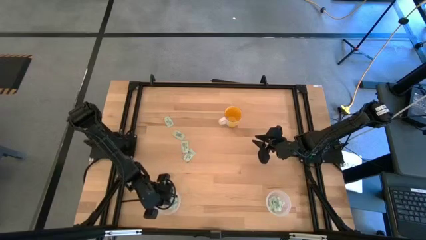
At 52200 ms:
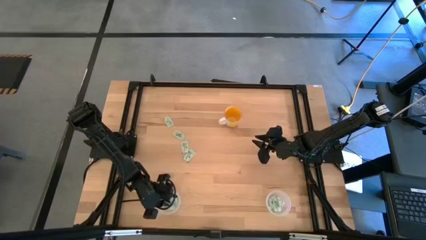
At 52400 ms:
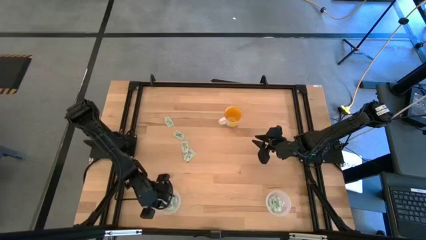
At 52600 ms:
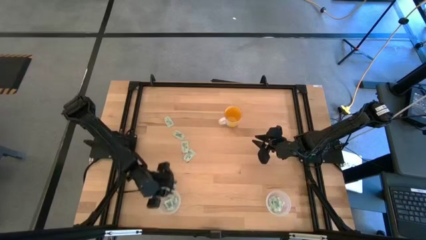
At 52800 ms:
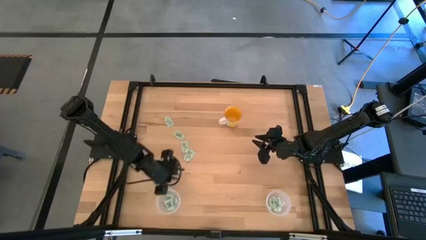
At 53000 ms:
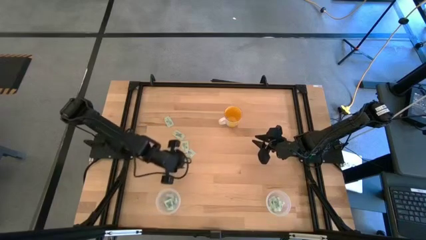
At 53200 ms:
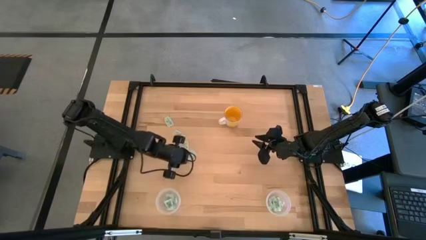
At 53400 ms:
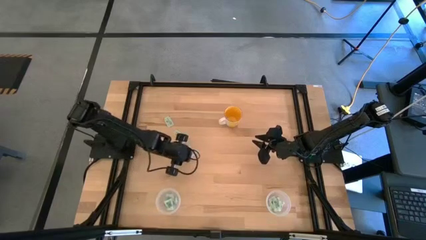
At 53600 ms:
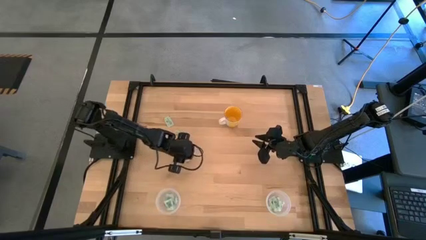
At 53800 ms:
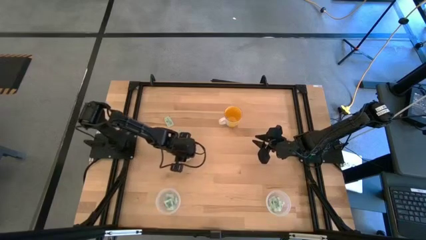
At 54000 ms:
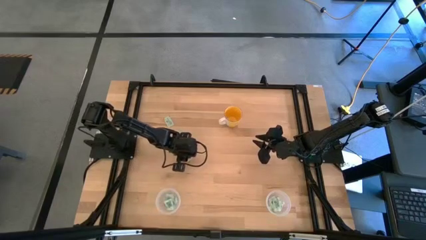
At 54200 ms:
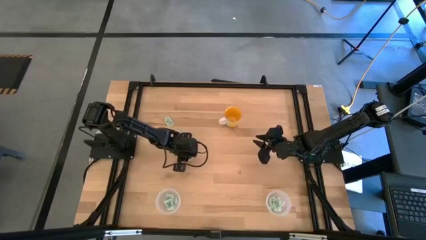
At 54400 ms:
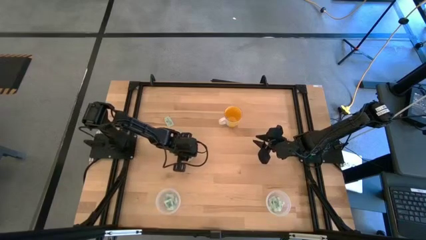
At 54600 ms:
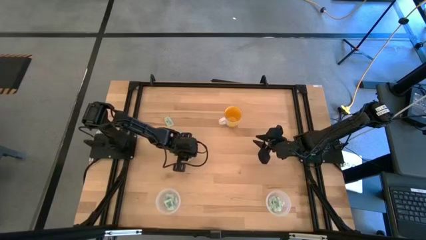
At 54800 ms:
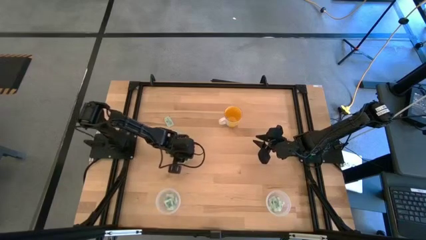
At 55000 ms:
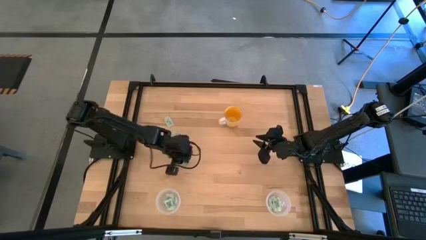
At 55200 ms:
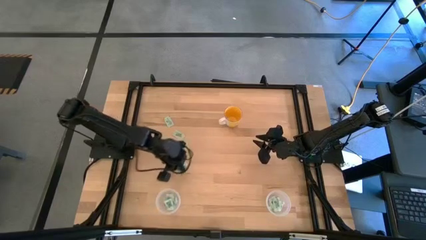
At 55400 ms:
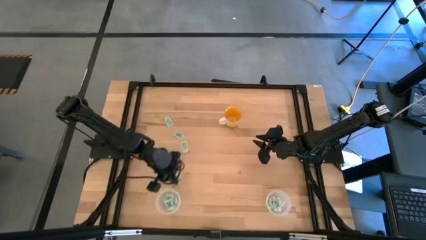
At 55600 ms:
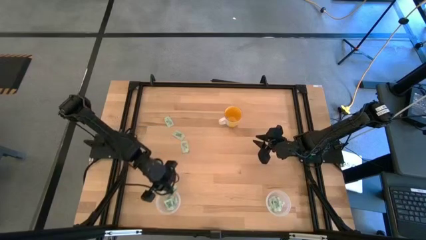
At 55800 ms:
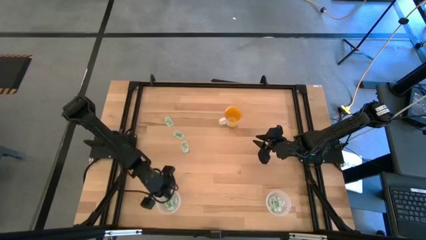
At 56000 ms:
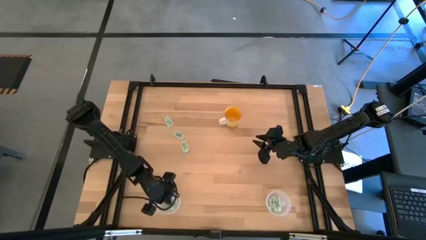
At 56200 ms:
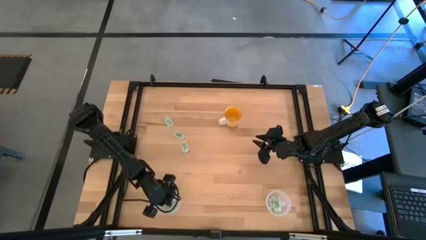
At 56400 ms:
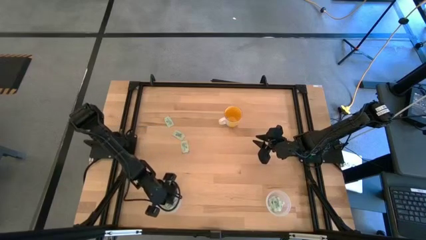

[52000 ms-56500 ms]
Task: Pick and place items into bin
Put the stevia packet into the left transparent bin

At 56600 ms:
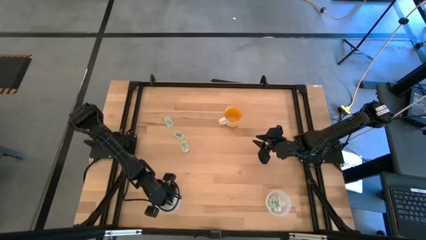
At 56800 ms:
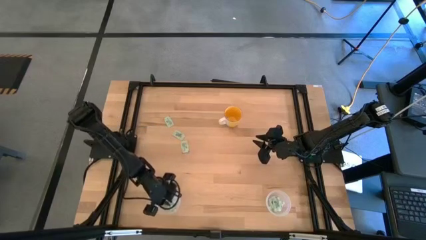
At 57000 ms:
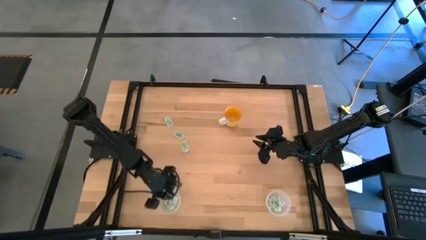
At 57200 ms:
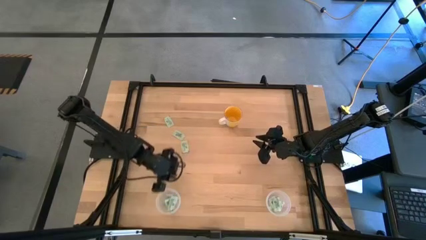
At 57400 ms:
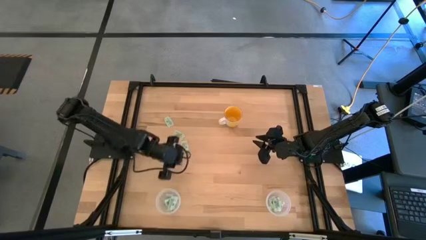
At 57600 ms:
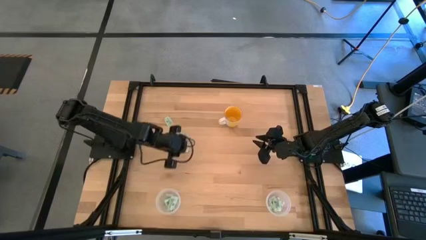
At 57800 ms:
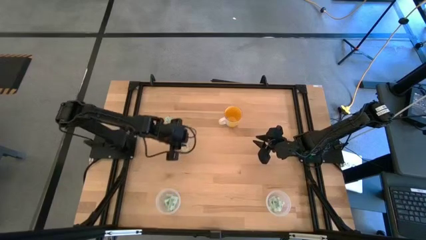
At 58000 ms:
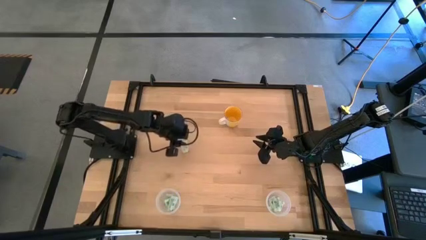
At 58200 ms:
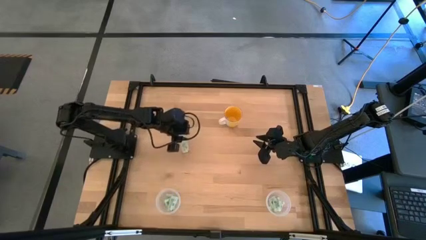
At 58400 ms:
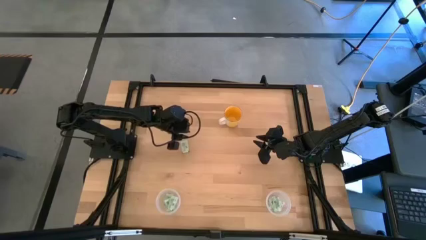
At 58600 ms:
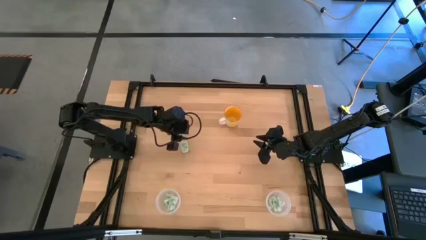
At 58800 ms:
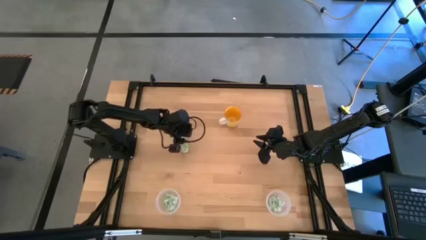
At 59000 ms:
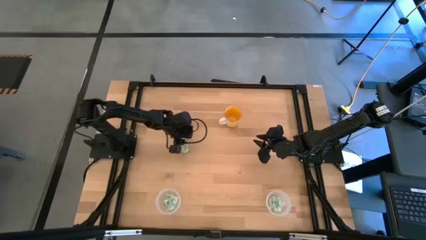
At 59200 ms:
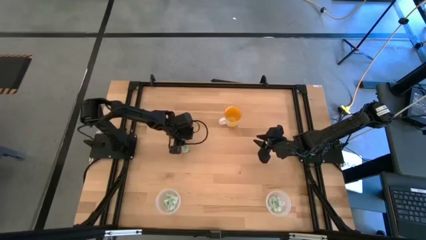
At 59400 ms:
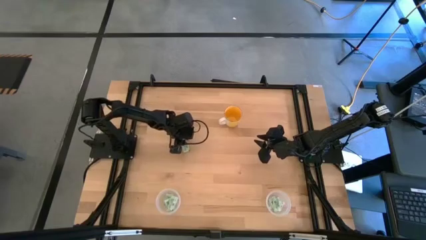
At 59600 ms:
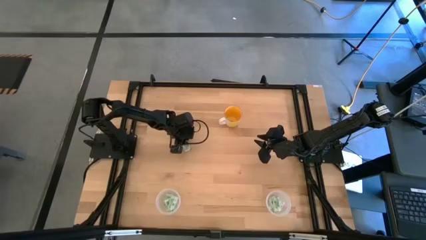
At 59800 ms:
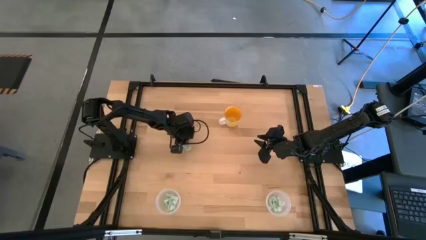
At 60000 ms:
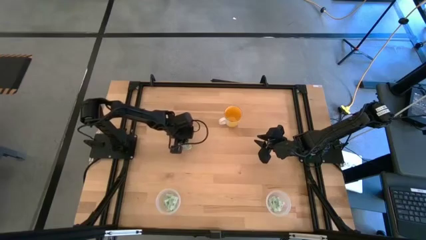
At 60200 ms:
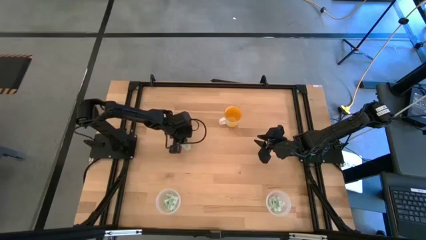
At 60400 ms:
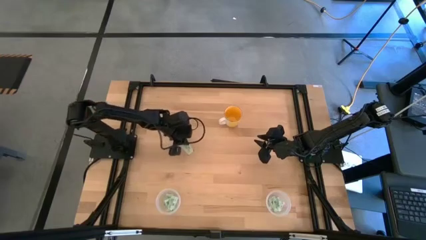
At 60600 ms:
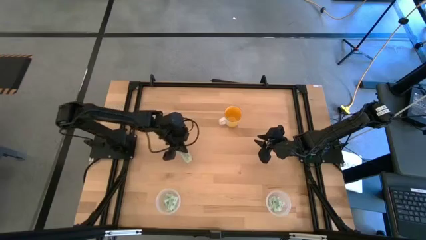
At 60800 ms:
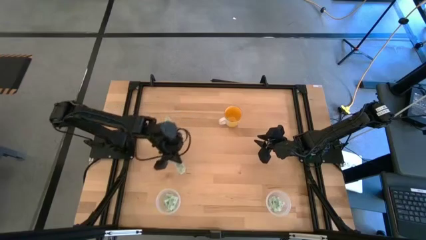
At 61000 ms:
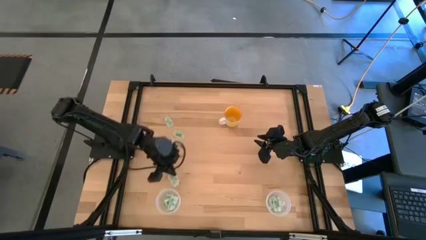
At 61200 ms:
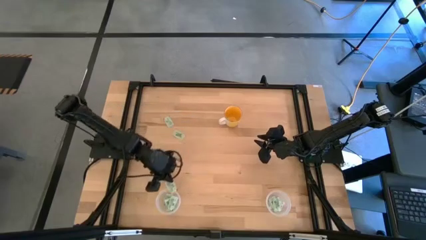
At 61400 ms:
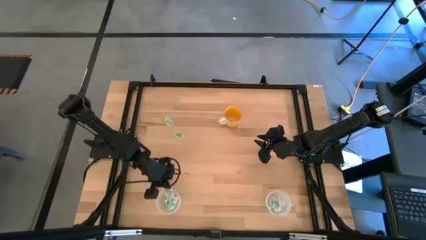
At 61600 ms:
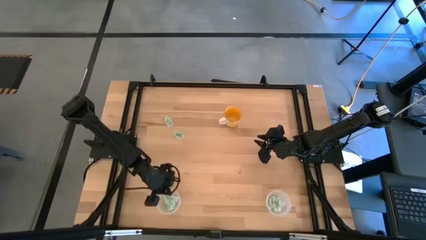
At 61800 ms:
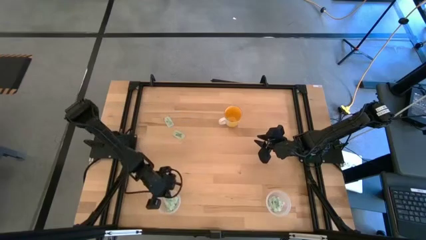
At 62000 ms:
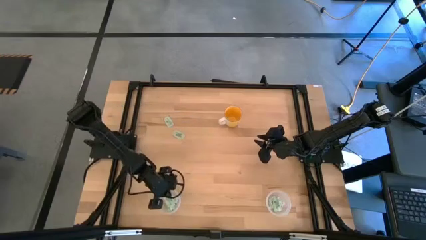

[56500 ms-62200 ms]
Put the stevia packet into the left transparent bin

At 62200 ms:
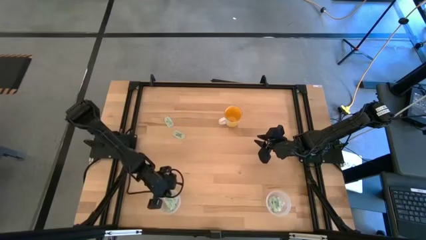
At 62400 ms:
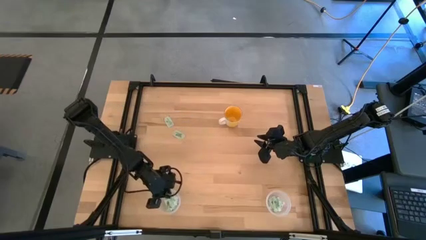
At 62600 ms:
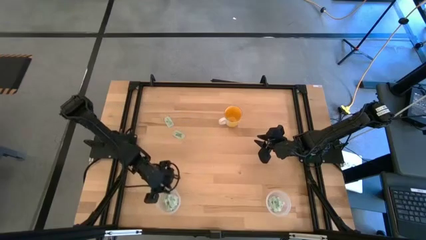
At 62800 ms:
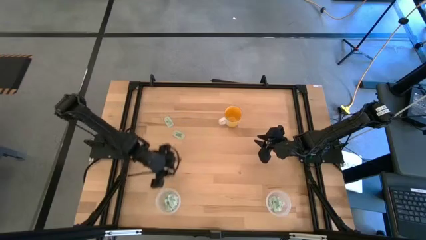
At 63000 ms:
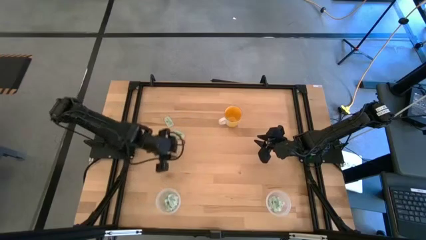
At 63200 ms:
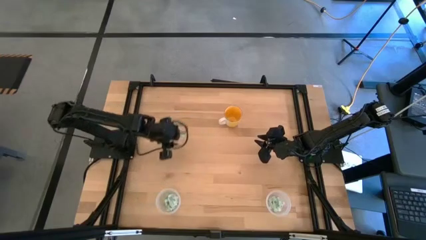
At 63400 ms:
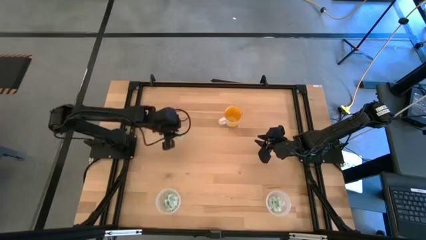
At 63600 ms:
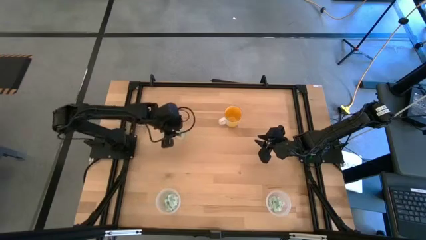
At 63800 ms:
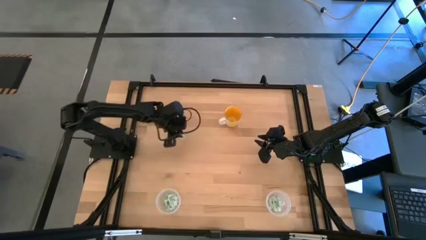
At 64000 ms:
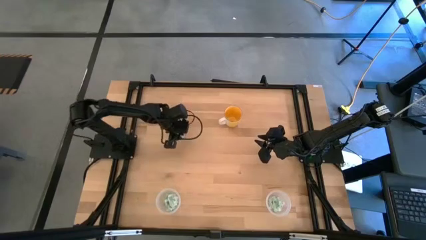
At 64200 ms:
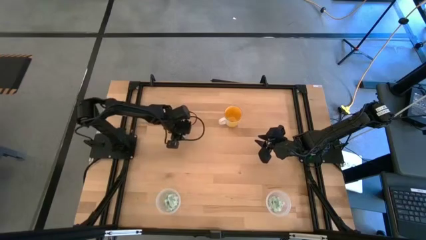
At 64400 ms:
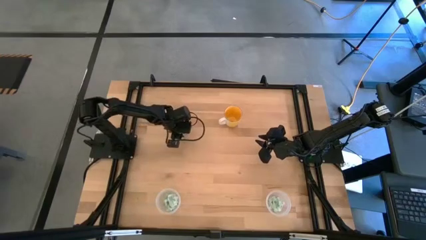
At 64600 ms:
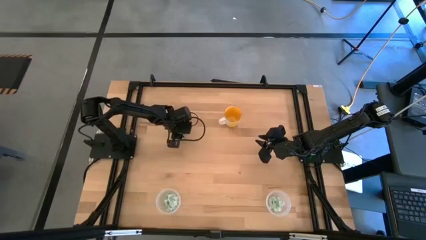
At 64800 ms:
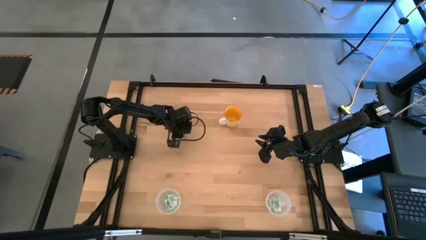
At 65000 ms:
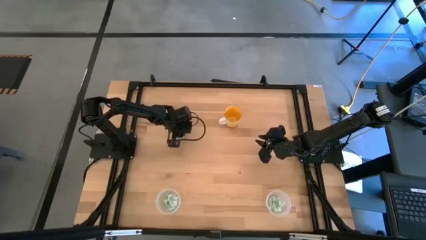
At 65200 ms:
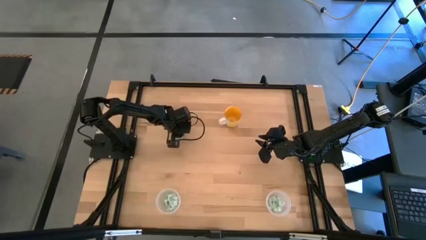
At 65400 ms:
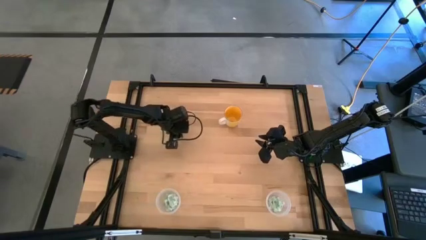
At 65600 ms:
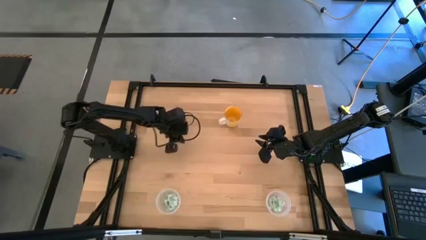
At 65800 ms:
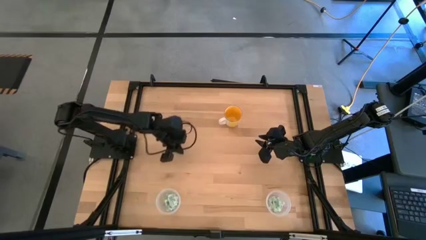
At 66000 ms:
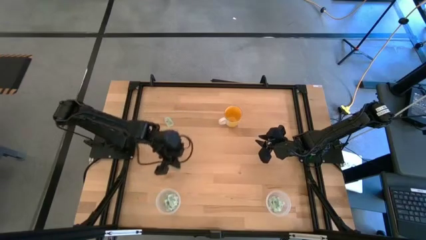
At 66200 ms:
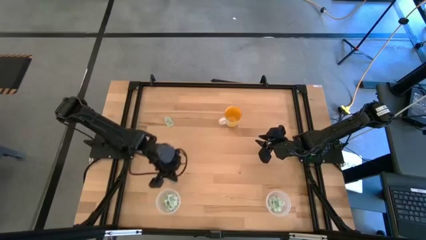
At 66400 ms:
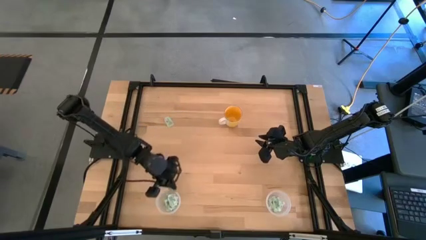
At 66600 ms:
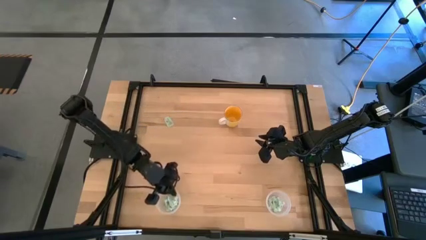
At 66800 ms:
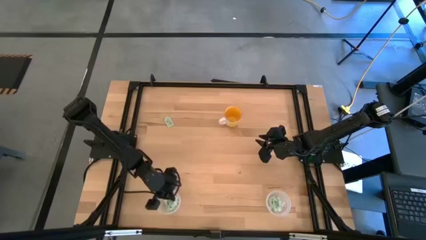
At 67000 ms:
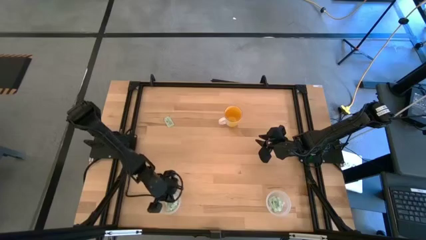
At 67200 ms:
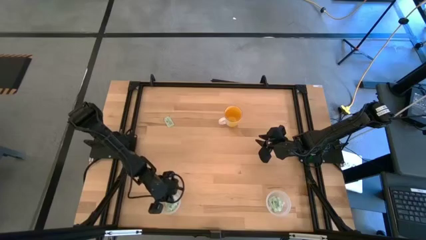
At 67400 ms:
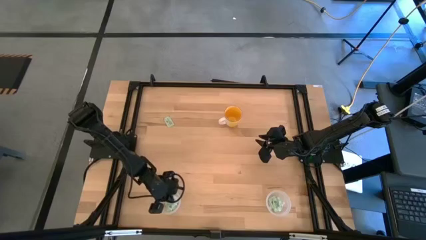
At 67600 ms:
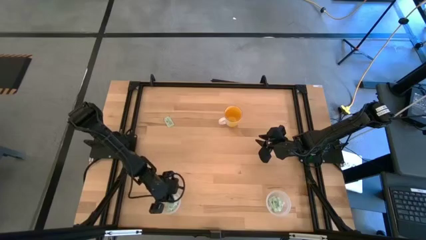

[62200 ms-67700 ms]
Put the stevia packet into the left transparent bin
